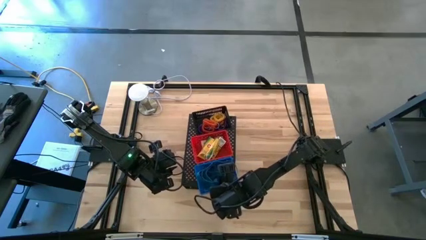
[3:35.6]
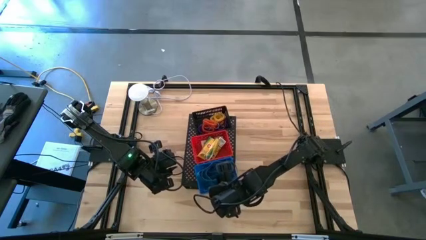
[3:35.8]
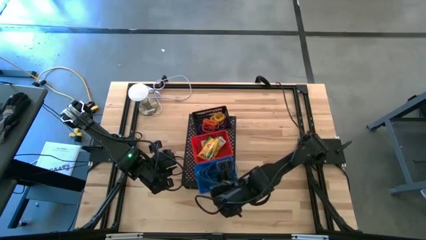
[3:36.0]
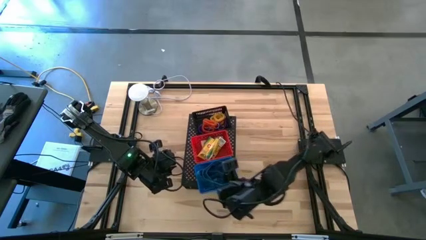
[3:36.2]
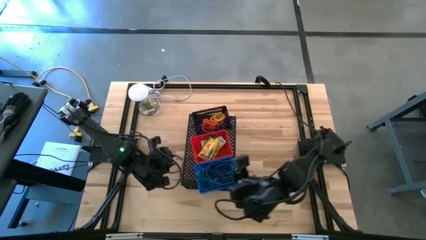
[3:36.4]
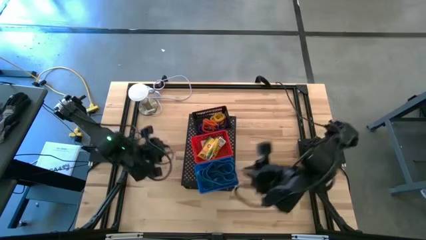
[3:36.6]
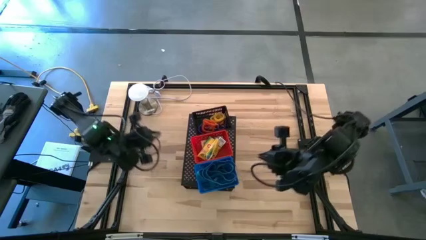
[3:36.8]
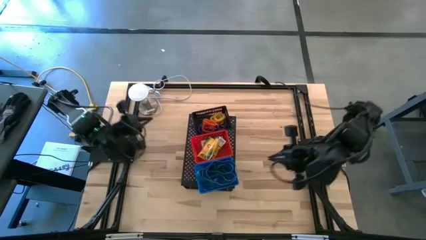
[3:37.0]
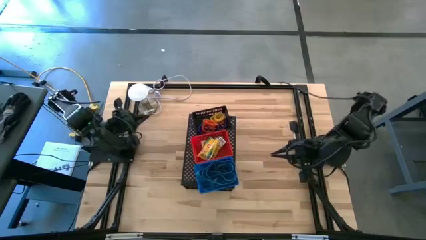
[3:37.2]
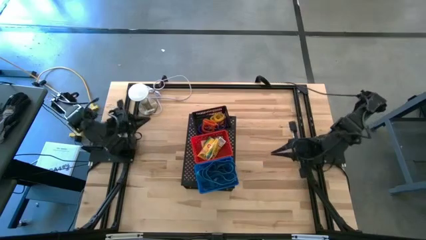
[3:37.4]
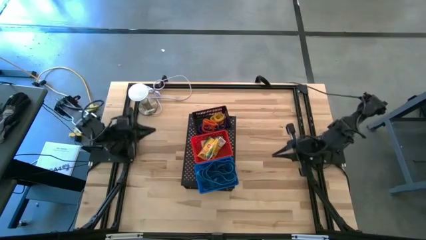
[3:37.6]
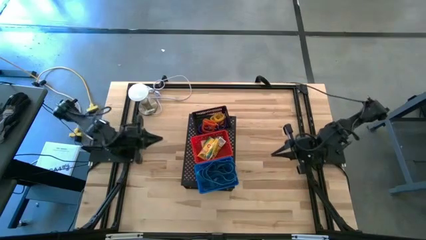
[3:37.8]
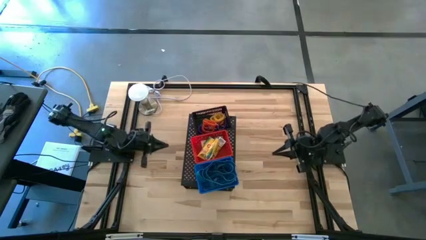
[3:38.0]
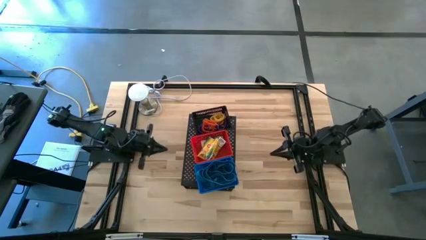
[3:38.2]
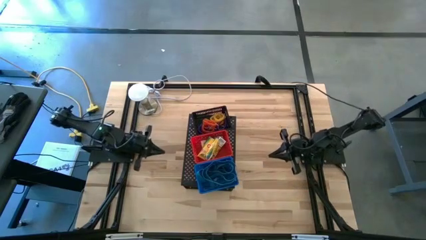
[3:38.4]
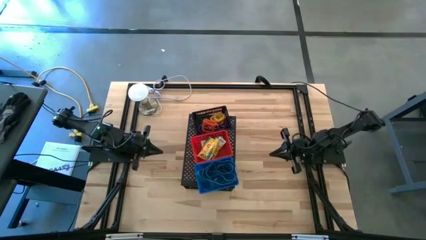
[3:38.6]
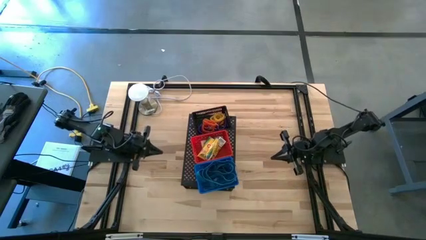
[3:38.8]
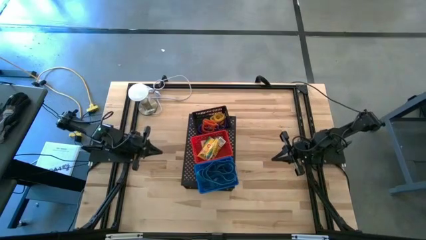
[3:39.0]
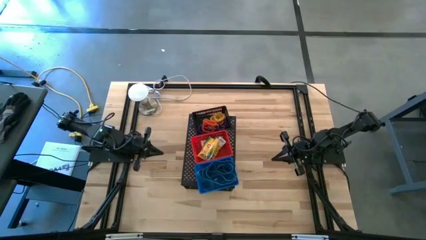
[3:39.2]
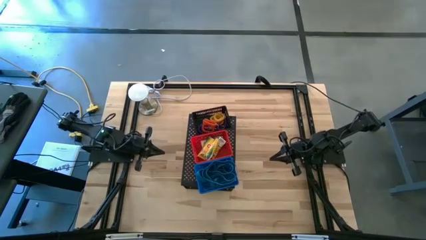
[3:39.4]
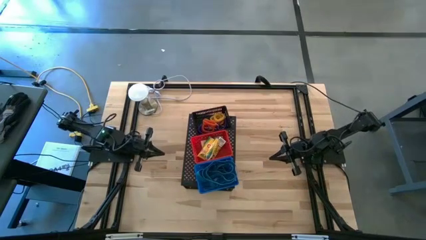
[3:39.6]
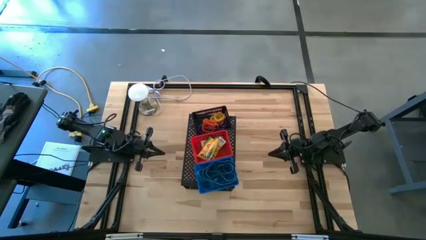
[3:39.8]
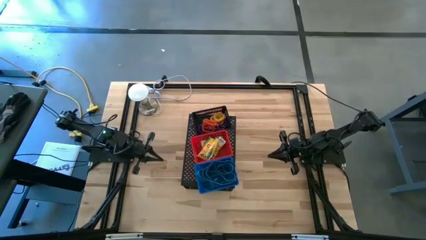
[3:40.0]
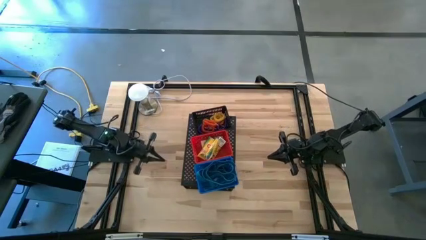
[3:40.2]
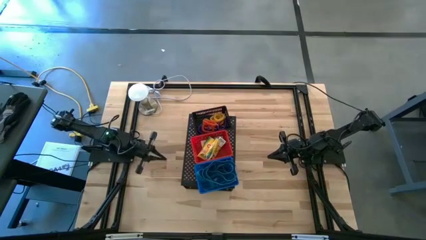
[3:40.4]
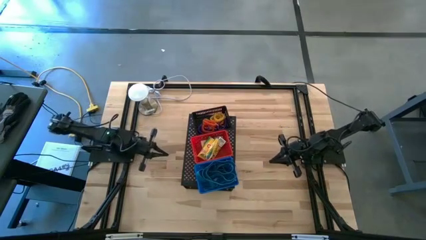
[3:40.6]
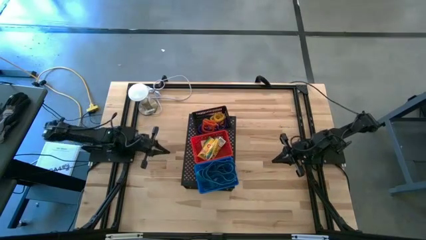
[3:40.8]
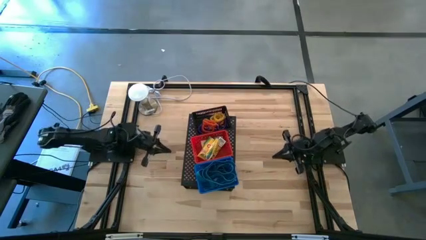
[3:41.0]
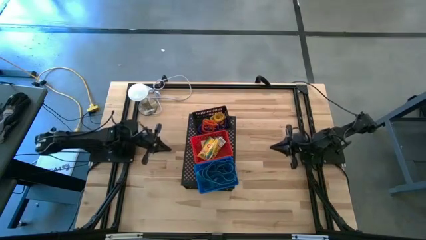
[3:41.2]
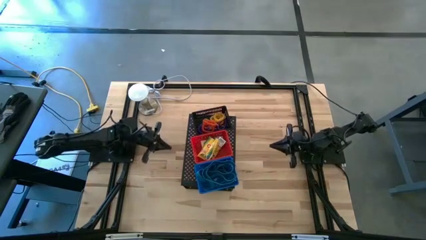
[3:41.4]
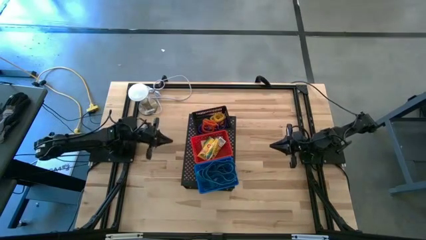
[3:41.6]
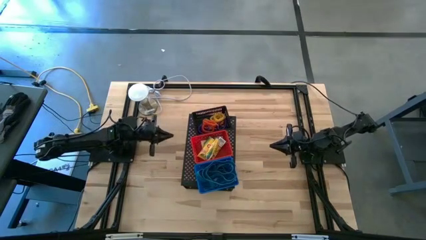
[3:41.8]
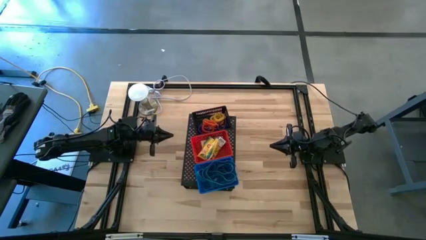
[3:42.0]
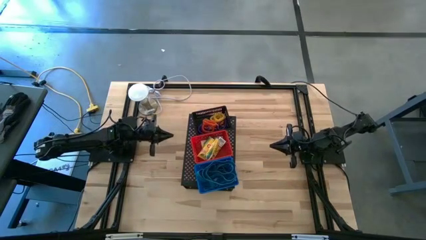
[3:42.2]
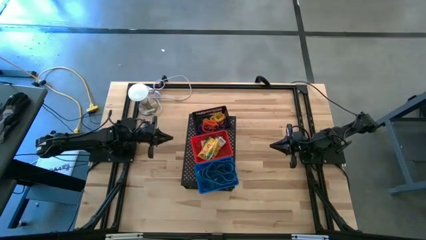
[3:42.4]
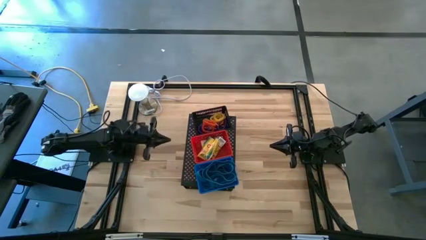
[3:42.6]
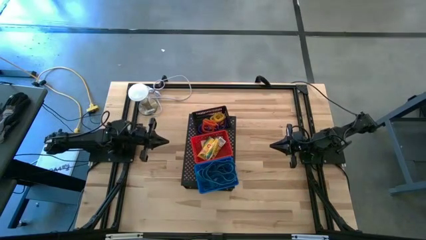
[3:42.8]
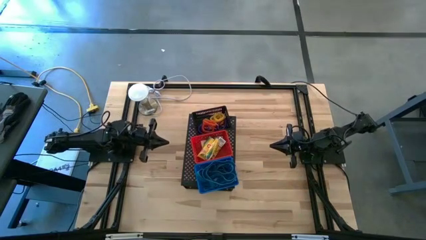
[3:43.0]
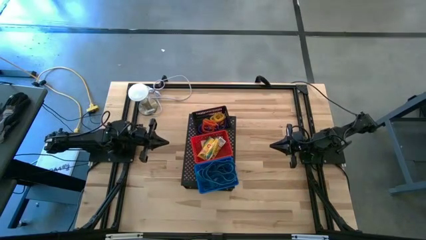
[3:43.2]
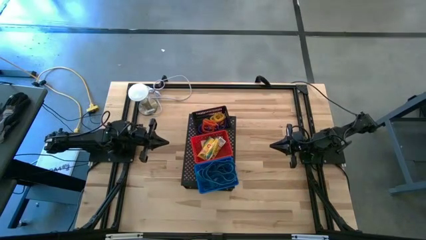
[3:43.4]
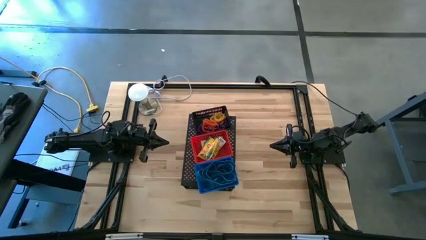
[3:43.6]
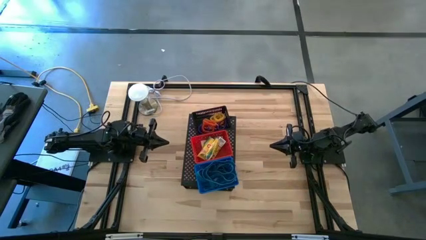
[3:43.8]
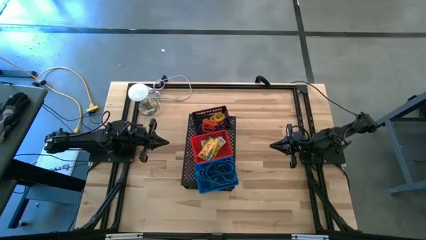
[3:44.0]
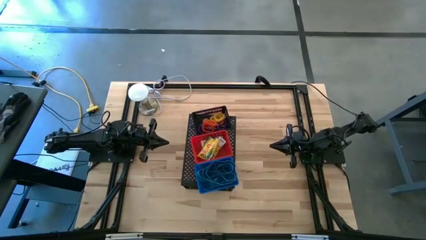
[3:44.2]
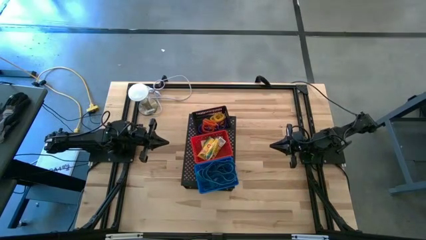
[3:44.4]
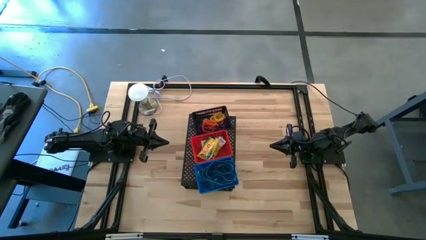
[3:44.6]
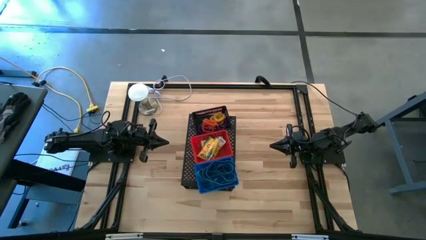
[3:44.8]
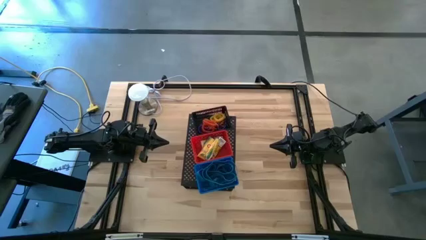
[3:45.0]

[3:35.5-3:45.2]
Task: Pick & Place Office Desk Supplies
Return to Home Position

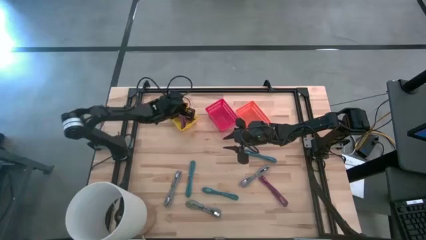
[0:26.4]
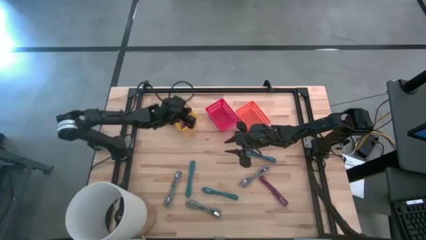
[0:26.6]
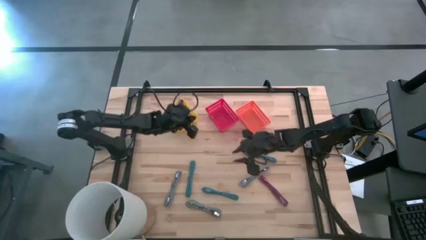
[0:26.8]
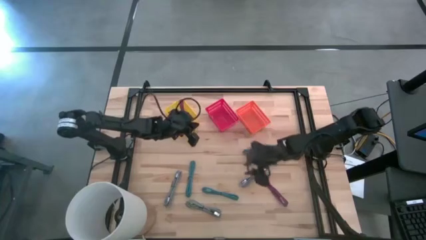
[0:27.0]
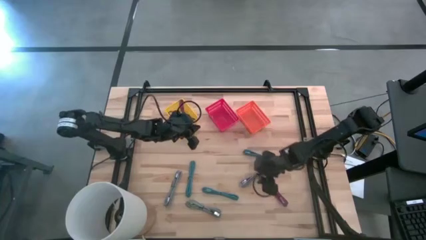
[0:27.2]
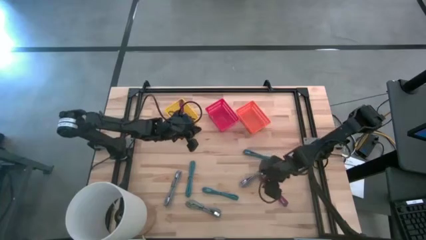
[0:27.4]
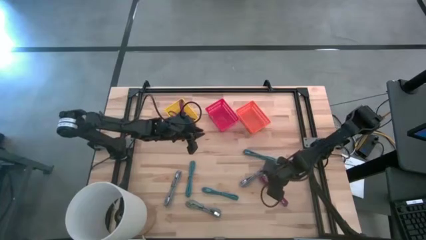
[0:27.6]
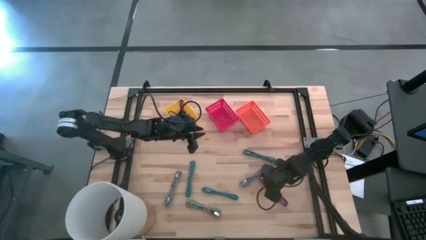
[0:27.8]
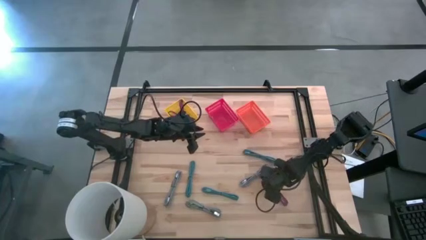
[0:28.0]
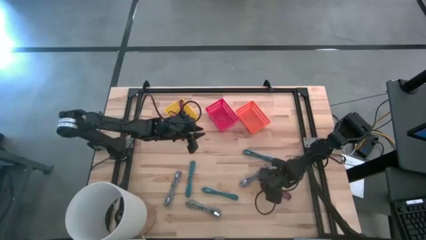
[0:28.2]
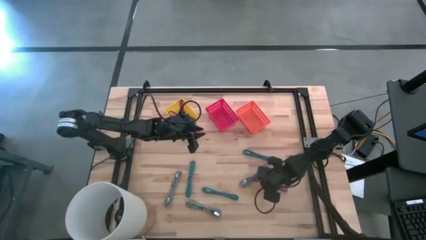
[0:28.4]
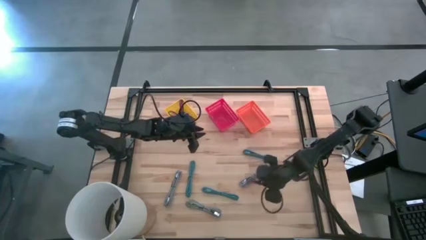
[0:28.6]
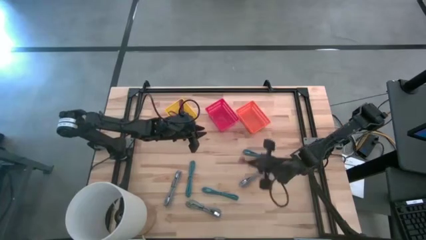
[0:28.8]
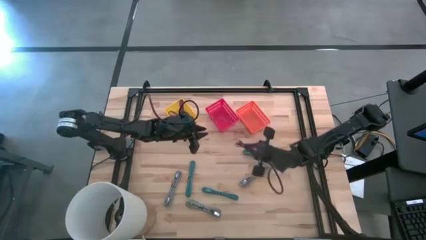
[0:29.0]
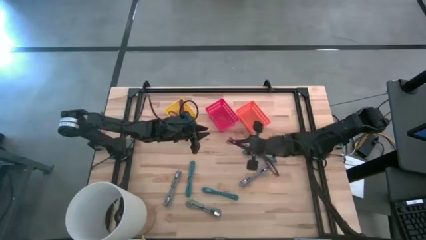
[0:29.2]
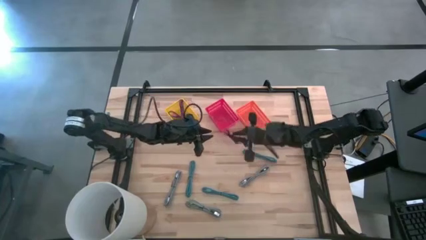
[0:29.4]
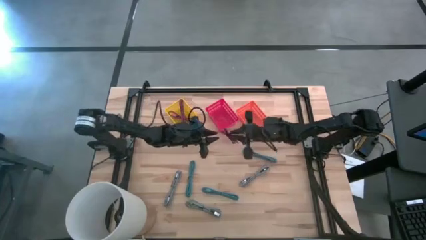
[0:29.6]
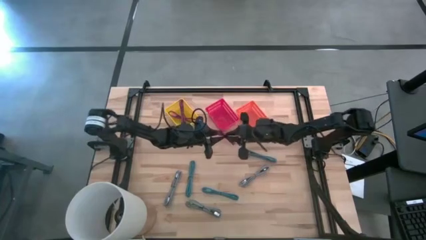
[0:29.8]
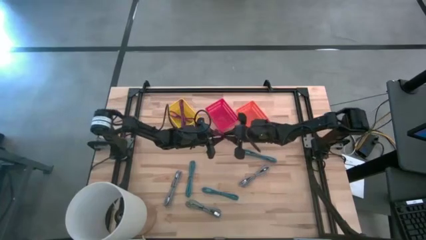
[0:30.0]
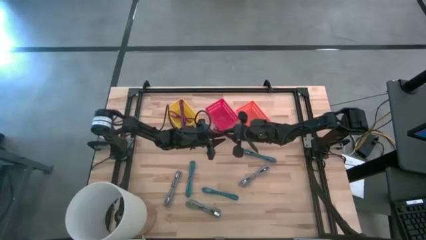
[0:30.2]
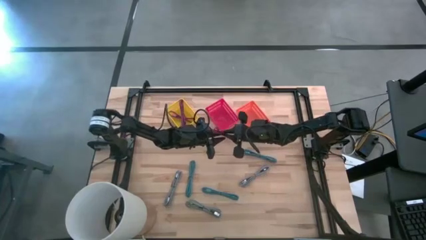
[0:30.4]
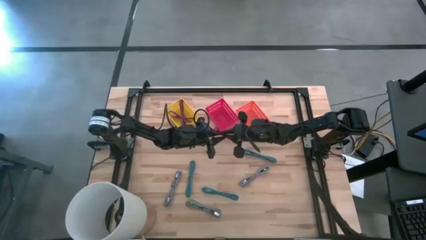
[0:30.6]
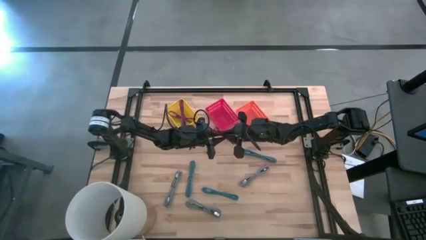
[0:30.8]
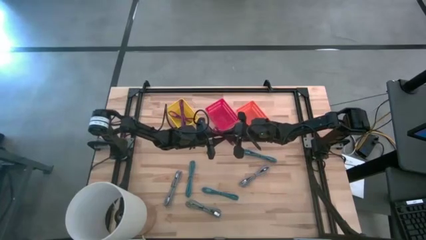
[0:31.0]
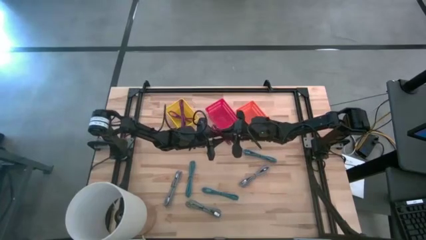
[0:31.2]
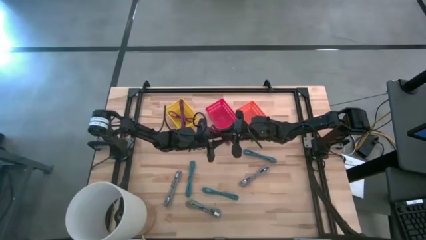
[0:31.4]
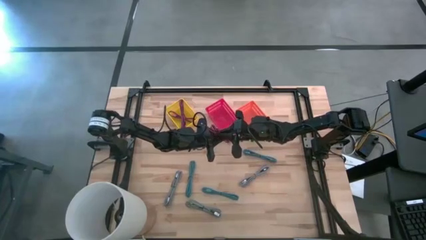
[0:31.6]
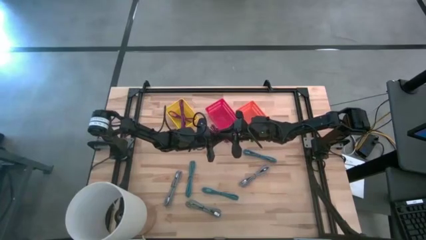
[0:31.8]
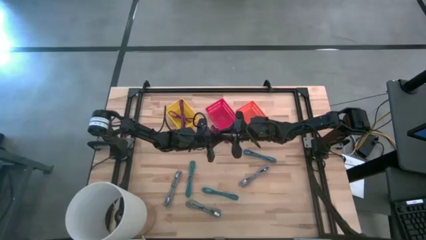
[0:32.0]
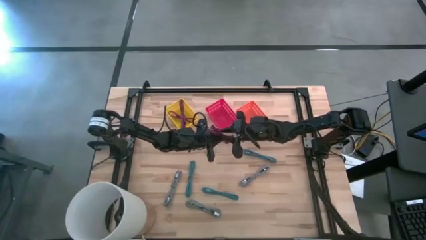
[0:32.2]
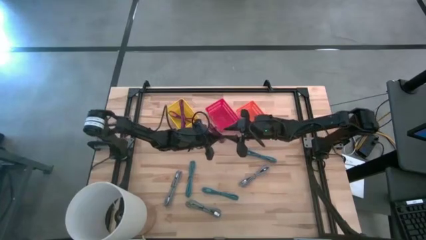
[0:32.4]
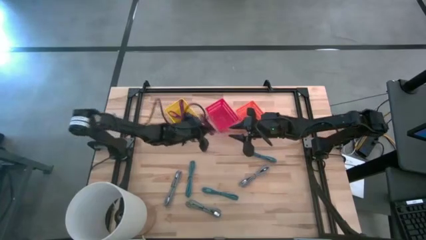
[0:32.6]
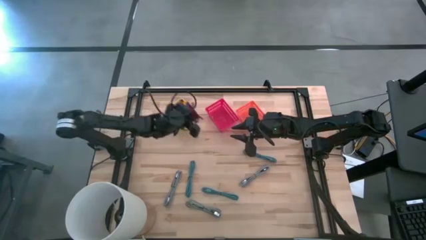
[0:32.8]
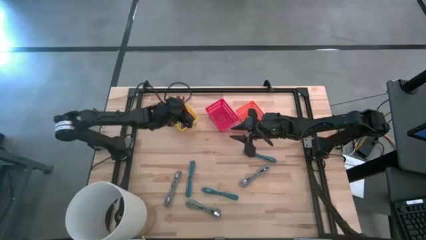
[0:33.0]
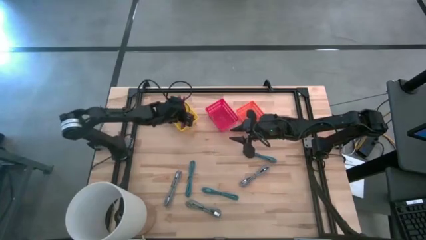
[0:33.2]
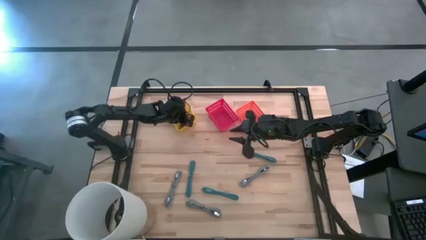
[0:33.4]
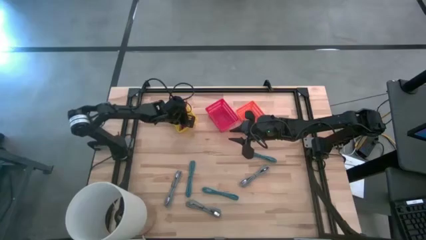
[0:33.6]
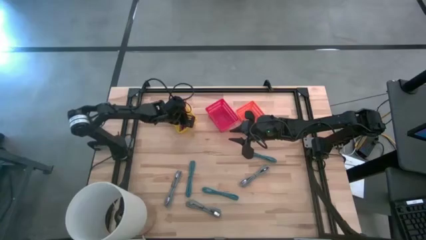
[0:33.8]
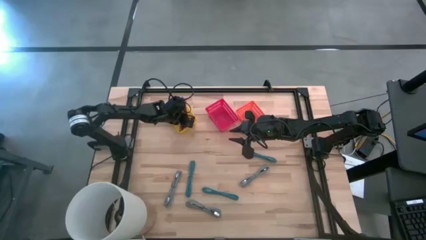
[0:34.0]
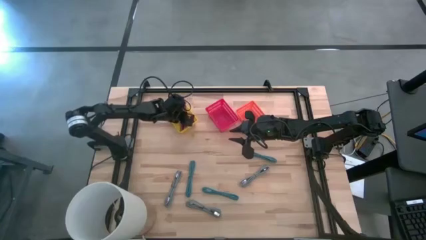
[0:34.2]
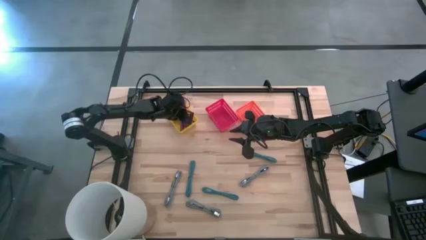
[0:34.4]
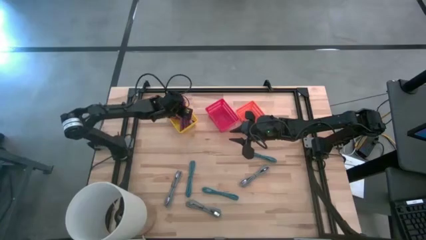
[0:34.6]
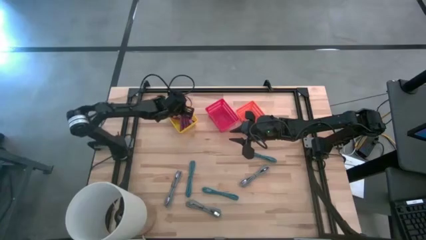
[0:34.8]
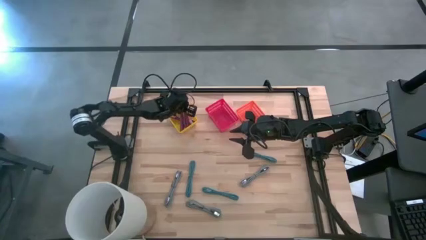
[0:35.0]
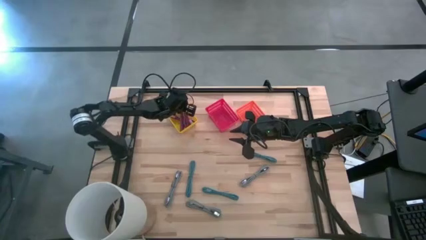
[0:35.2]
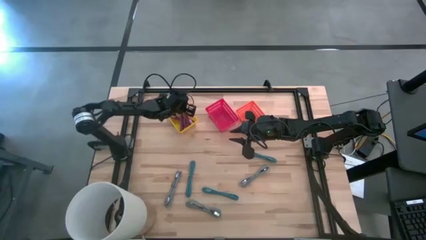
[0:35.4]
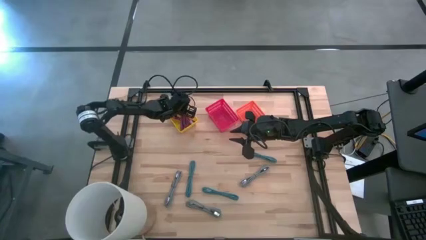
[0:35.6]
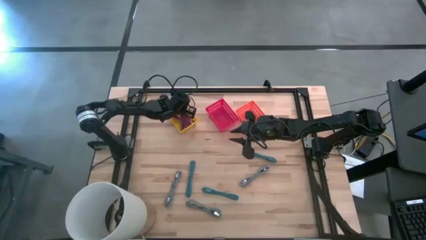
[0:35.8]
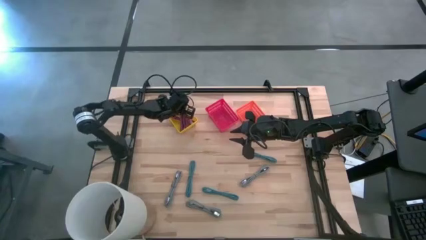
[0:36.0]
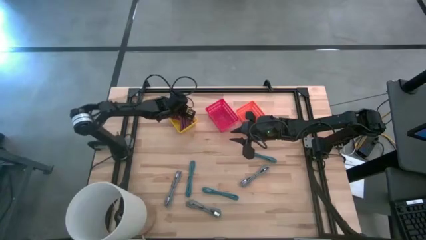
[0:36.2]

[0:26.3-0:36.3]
Task: Pick & Place USB Port
Put the black violet USB cable into the yellow bin
